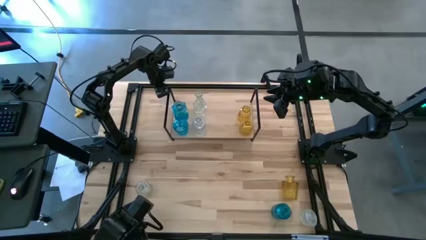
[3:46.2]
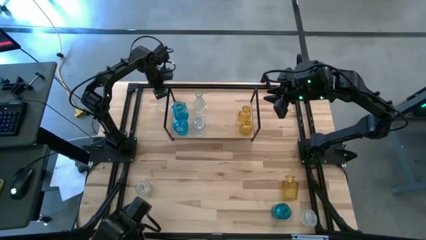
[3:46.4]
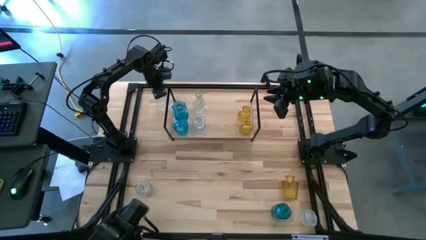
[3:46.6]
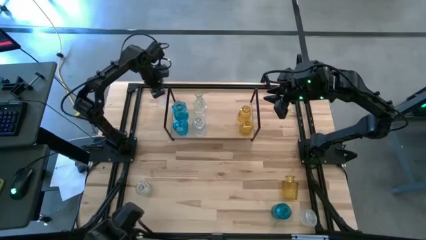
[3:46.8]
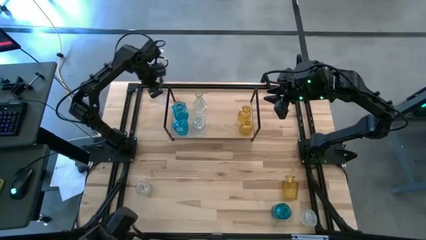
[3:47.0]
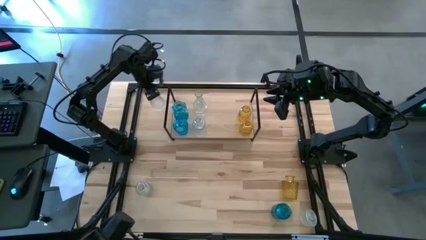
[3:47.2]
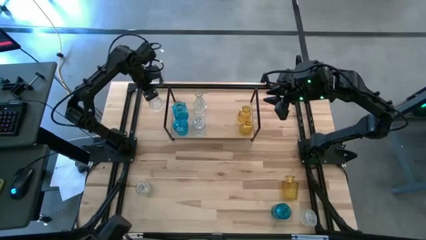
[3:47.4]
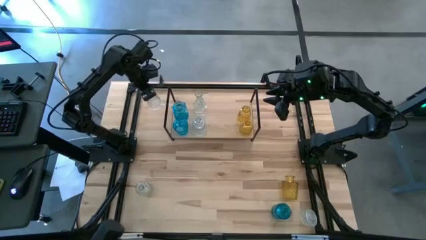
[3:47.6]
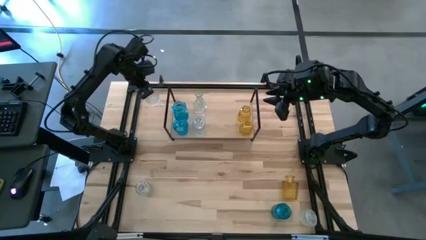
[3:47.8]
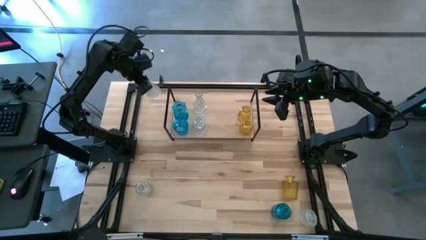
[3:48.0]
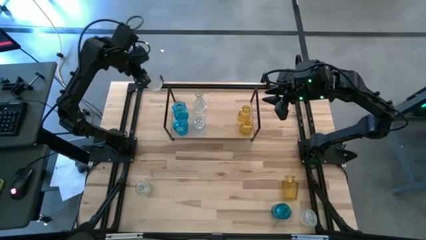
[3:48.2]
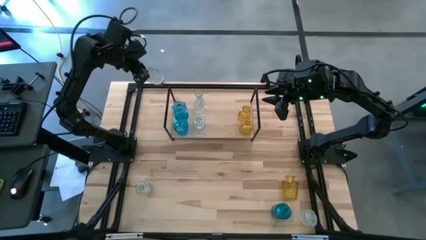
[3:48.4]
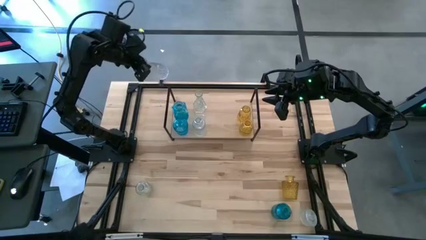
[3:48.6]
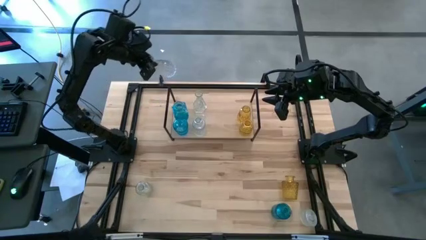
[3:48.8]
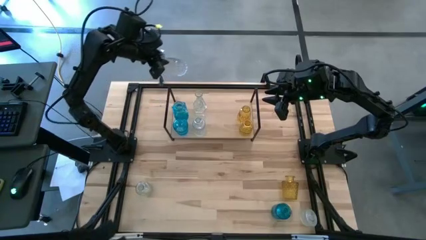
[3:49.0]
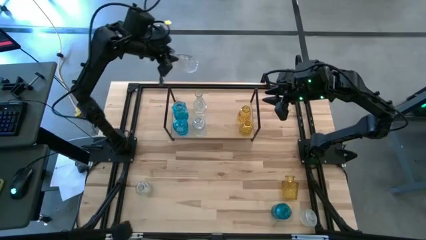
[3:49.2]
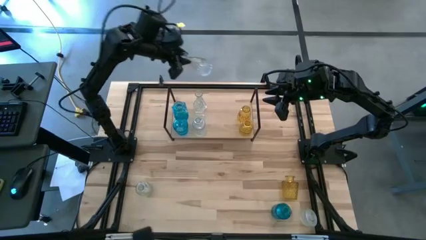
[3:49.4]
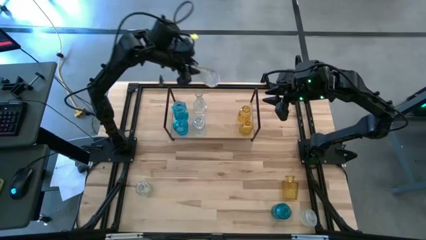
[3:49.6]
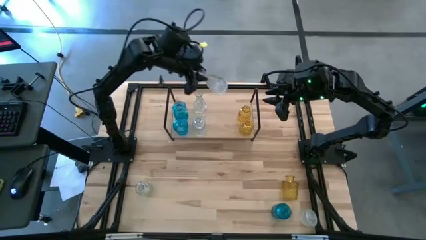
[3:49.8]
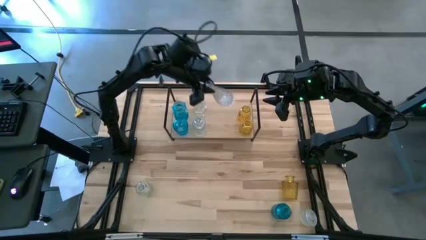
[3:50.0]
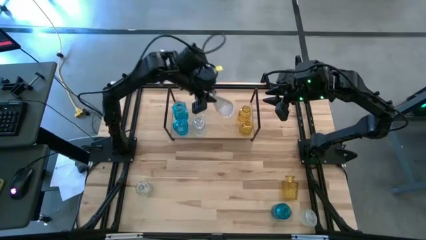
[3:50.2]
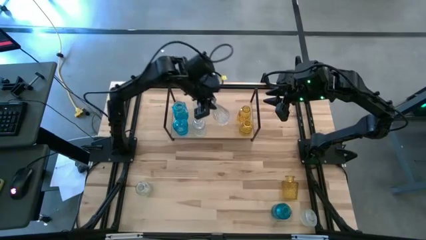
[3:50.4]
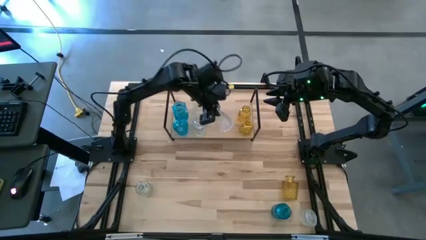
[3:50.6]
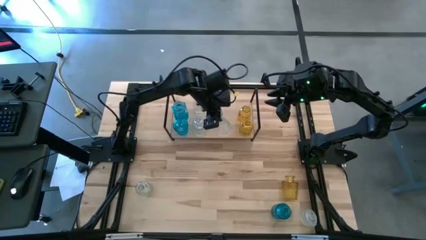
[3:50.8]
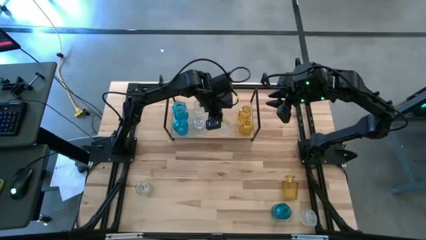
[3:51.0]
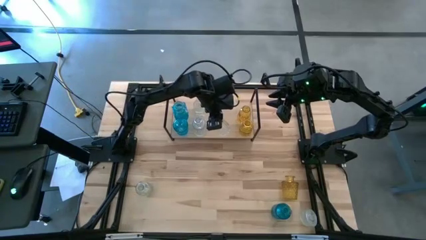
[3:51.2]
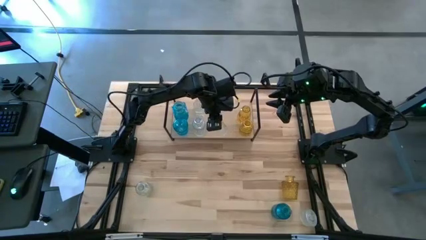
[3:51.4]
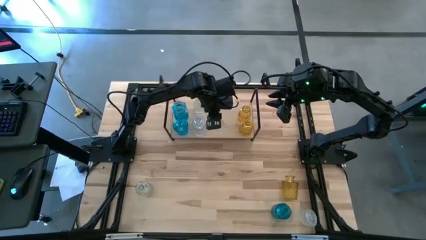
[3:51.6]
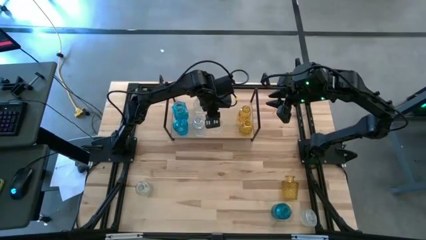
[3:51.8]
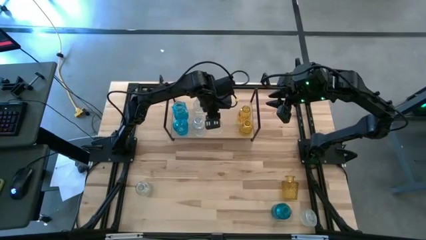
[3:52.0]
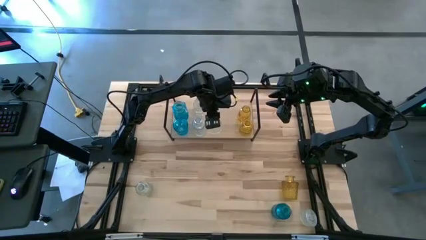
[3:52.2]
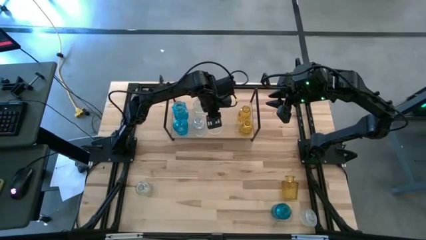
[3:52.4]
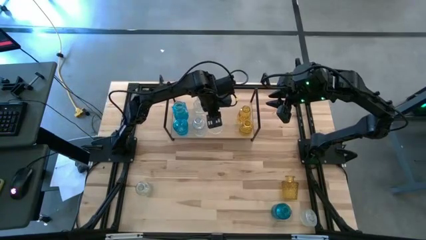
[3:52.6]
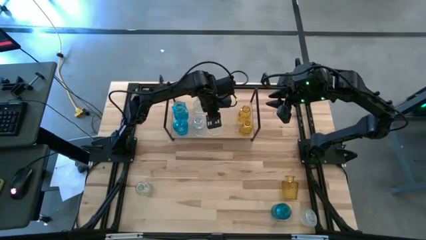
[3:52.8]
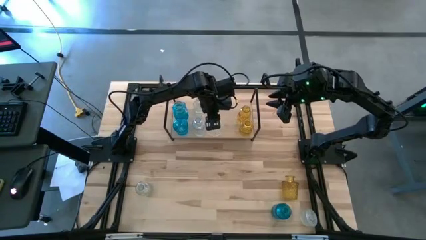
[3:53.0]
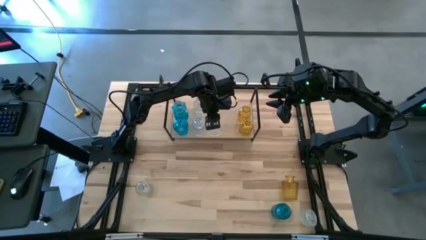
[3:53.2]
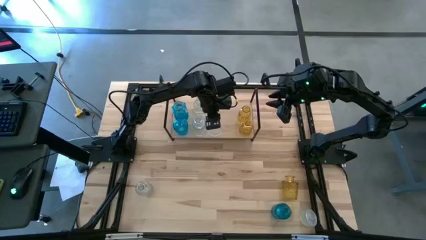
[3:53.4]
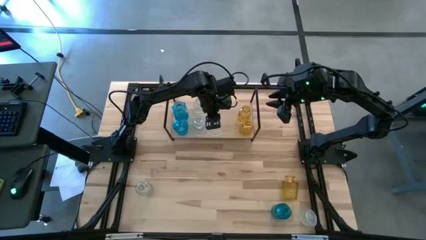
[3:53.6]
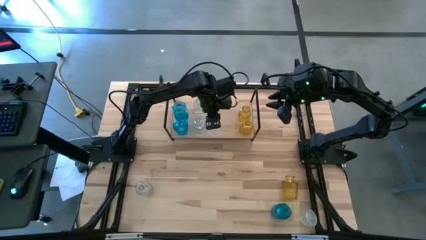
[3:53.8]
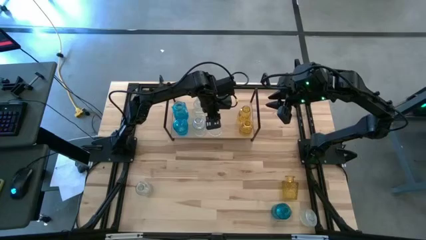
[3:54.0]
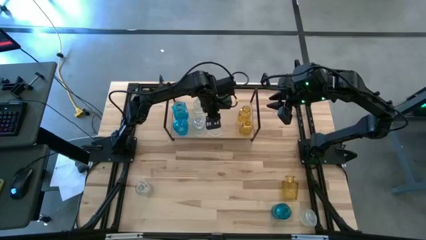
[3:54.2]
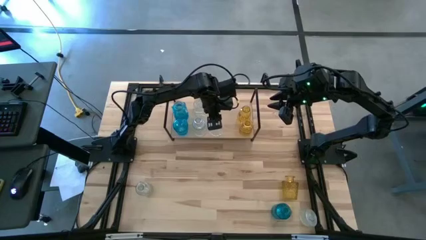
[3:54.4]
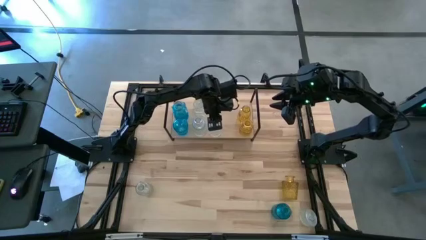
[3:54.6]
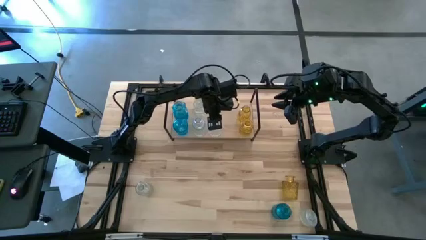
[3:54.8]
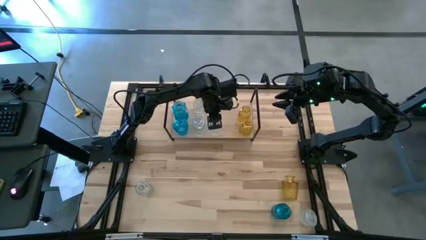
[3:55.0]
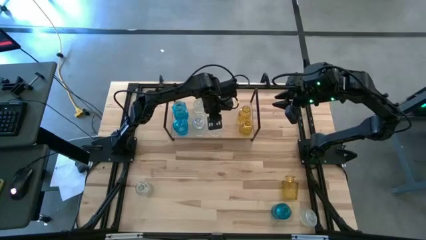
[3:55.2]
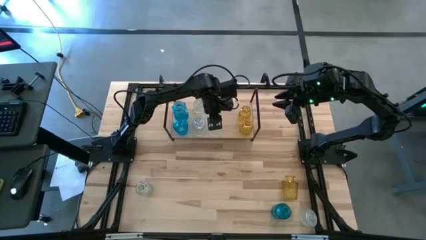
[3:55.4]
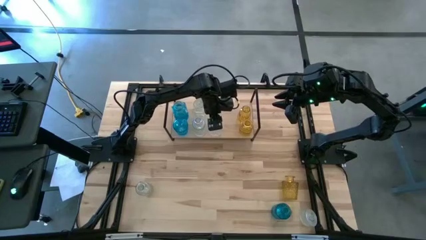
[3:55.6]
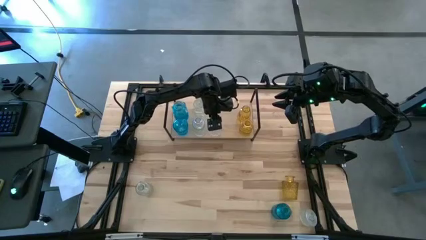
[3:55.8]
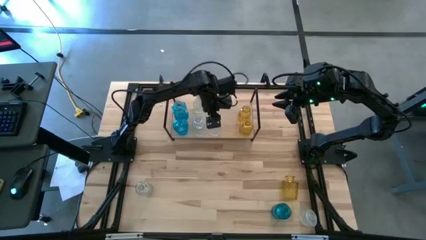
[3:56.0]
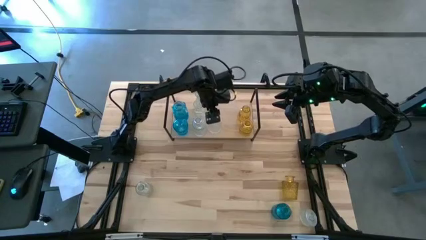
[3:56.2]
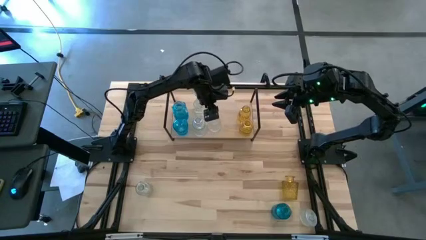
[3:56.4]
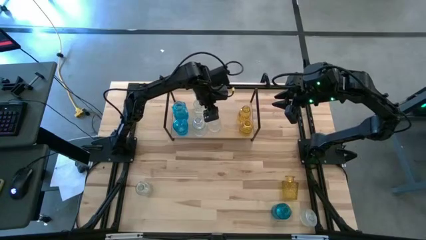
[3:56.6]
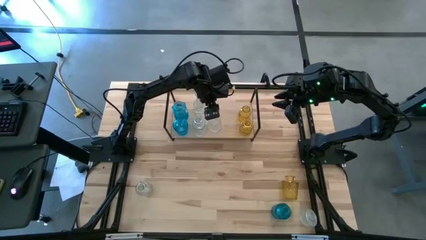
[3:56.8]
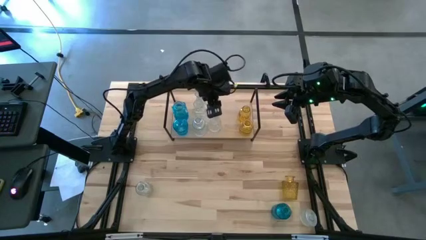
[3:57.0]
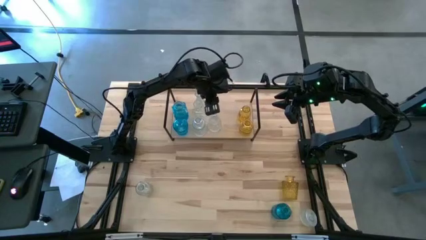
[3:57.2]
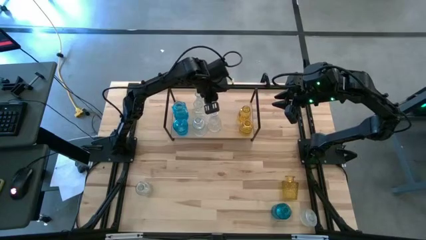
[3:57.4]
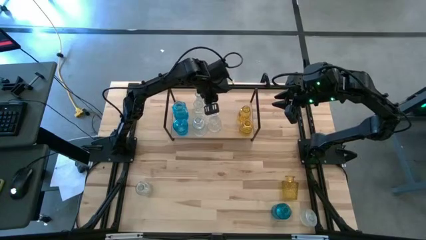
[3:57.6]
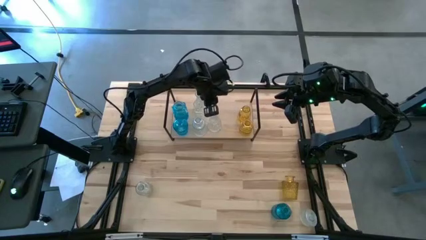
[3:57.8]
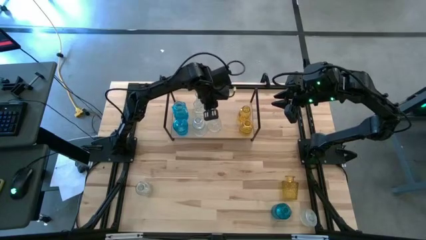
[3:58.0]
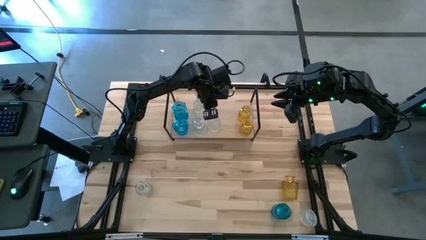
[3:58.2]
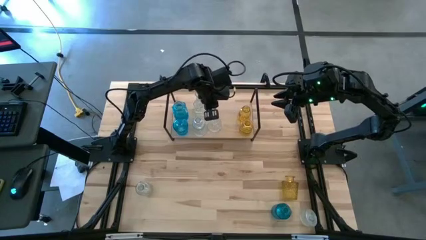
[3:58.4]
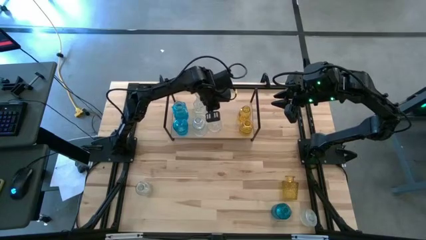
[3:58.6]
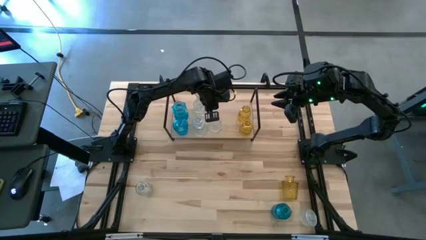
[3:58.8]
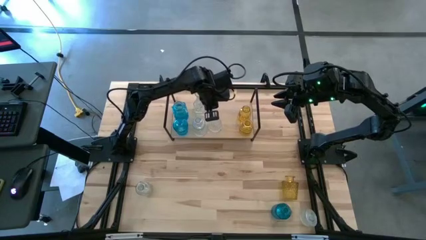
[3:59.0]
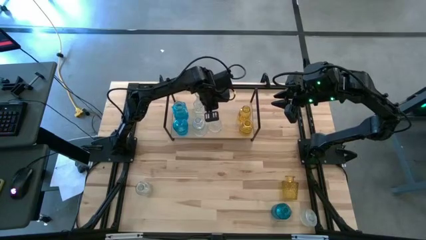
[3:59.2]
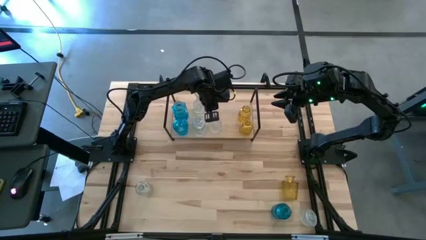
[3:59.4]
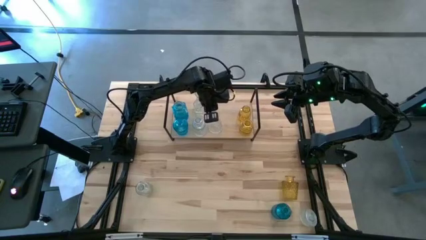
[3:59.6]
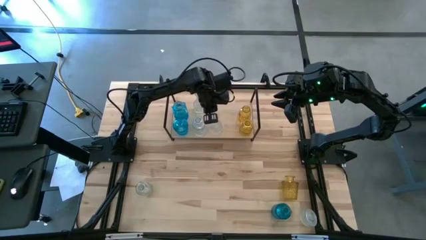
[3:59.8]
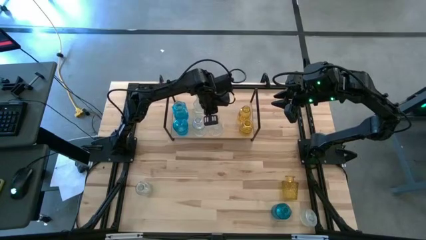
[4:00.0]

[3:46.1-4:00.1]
Task: sort vases onto shelf
Put the transparent vase on the shelf
